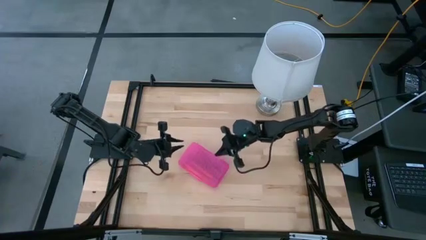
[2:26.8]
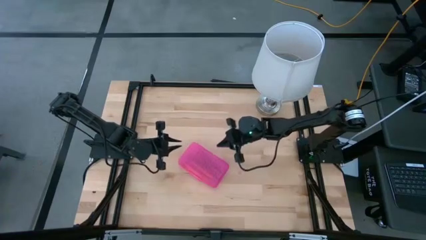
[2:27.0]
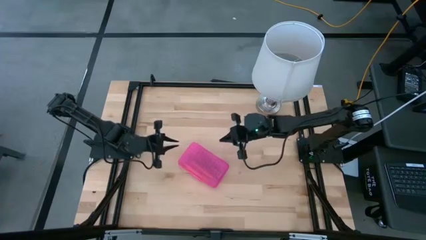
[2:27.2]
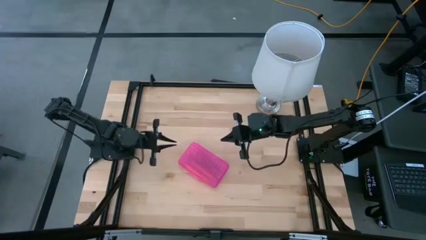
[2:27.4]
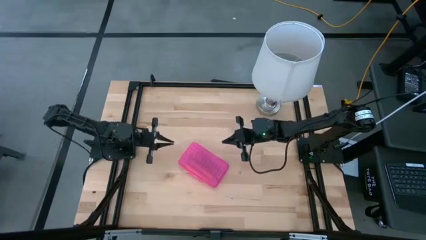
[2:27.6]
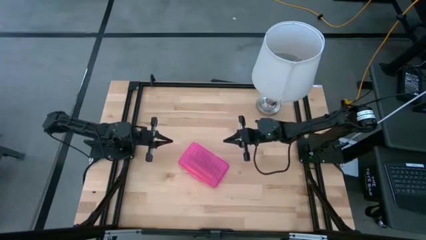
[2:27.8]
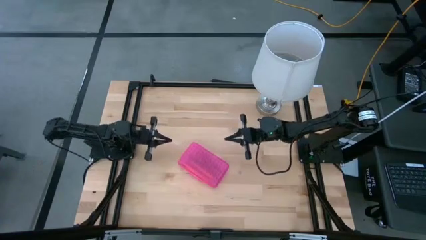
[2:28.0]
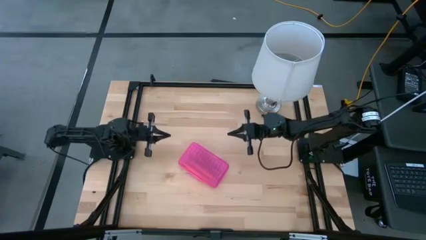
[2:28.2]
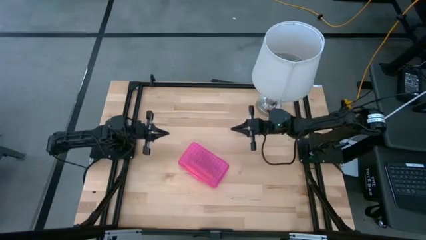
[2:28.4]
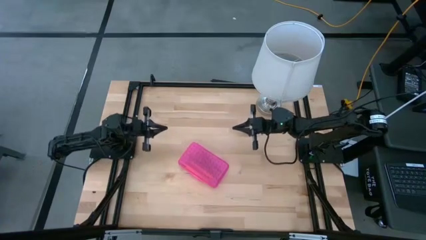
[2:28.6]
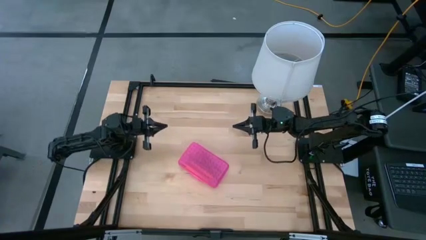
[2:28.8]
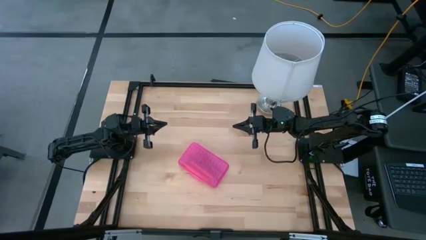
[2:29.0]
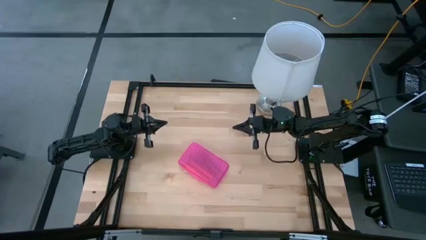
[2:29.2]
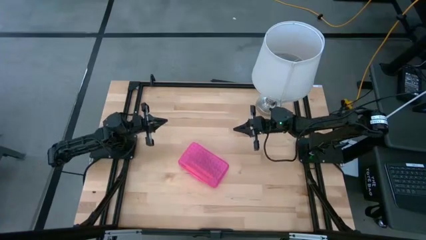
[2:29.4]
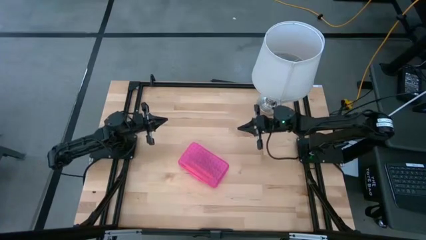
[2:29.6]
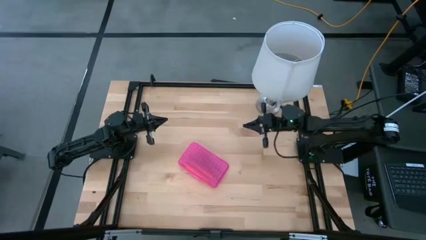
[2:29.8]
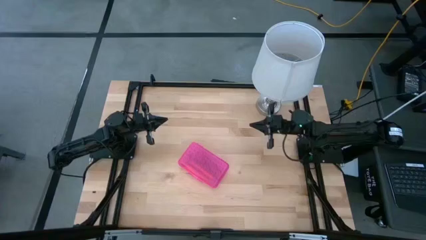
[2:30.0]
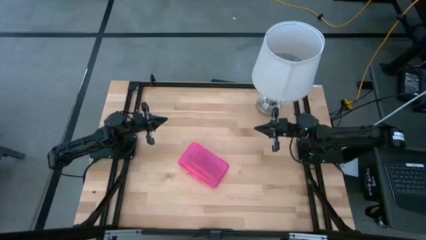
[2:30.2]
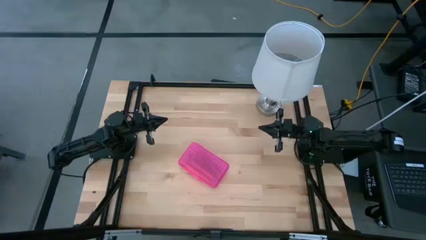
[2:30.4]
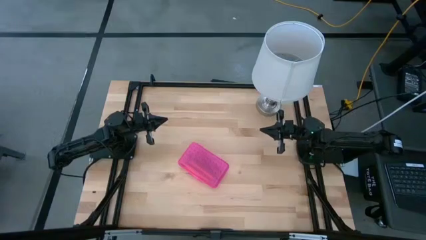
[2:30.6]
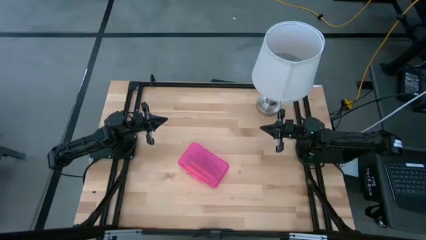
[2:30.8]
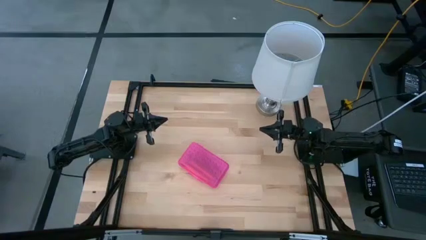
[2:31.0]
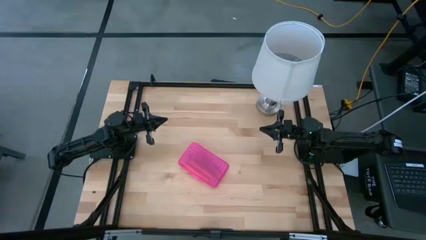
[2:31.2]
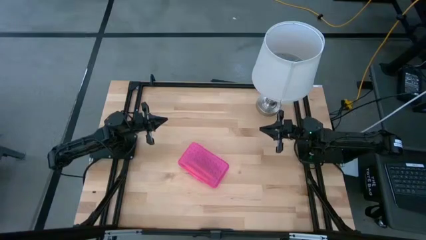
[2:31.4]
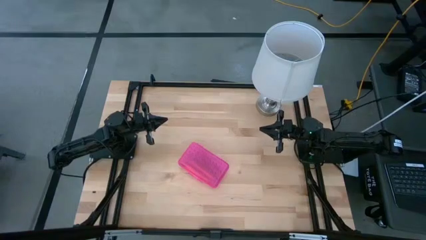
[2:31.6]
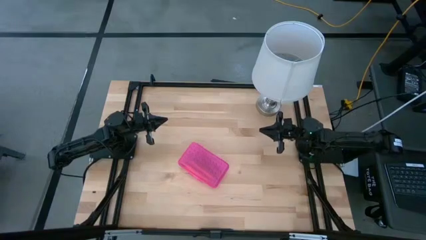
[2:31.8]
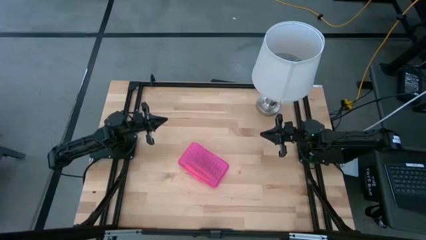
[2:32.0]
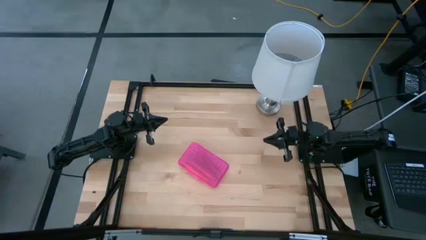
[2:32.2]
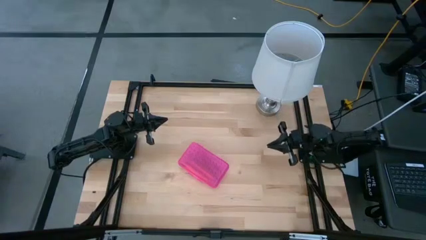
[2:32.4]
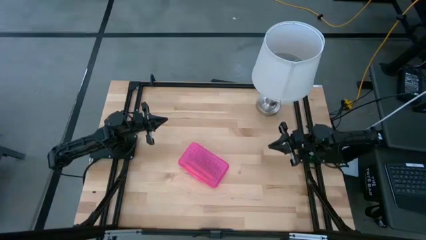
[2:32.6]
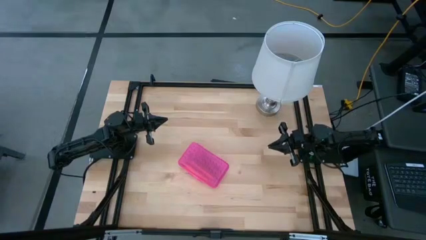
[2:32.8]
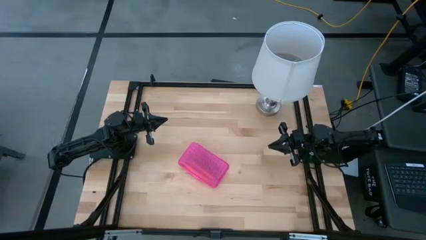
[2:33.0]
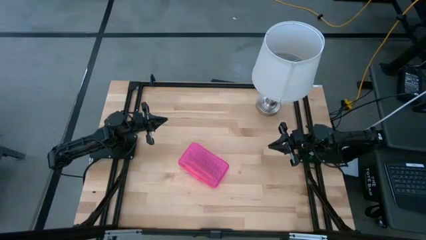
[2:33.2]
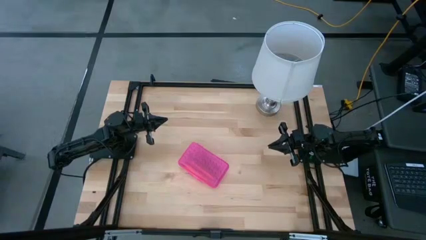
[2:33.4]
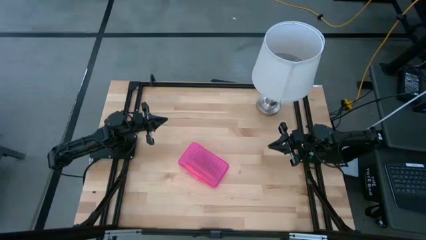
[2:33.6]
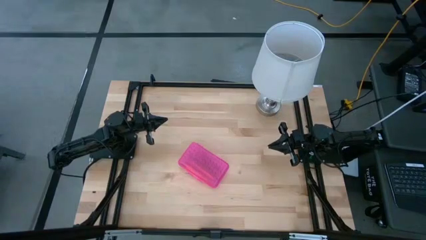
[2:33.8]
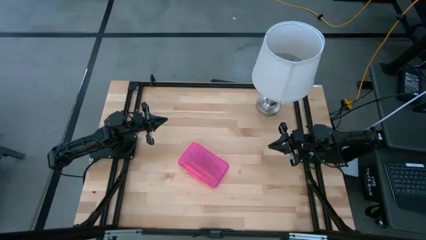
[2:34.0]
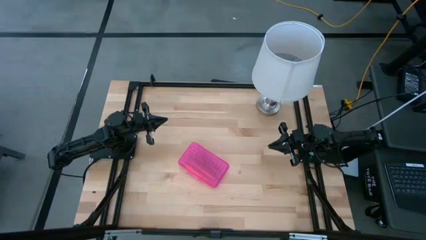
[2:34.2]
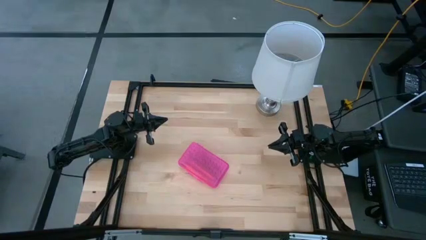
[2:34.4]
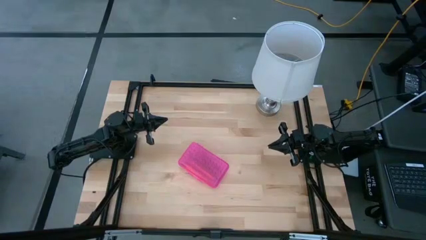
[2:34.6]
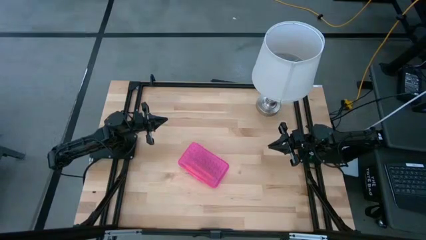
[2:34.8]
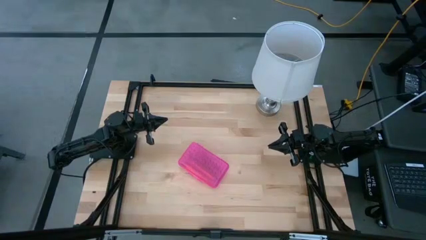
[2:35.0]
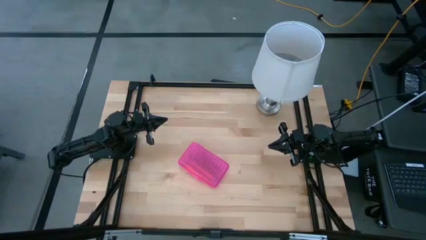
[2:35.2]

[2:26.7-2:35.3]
Task: Pick & place school supplies into a supply box
Return to Home Position

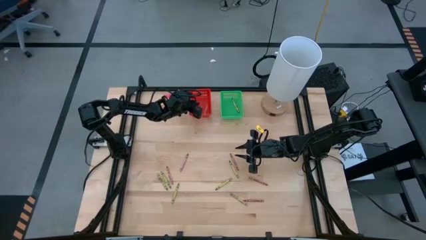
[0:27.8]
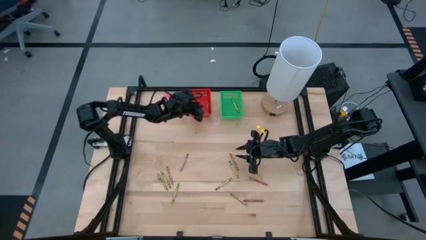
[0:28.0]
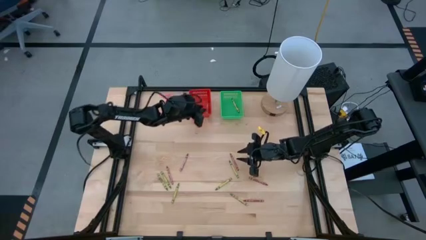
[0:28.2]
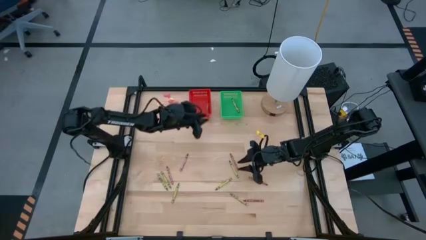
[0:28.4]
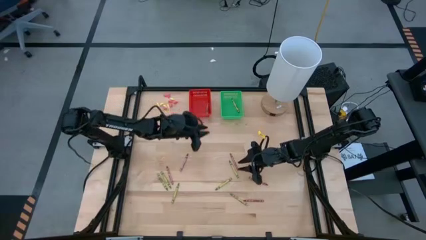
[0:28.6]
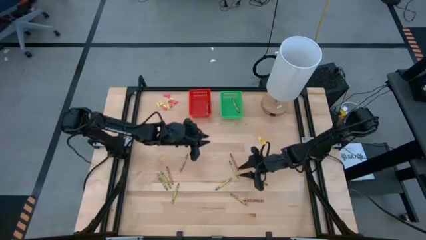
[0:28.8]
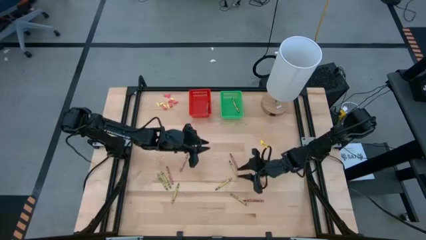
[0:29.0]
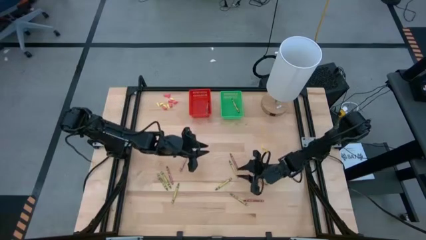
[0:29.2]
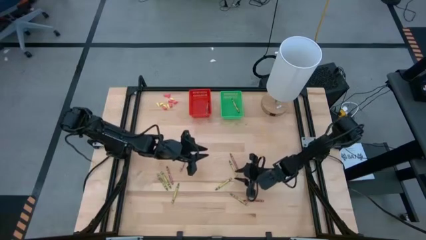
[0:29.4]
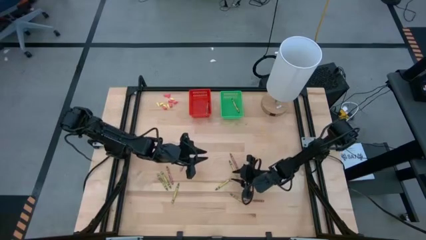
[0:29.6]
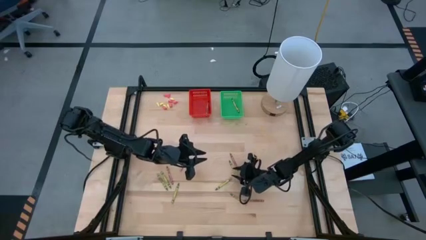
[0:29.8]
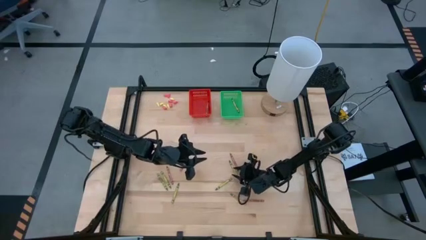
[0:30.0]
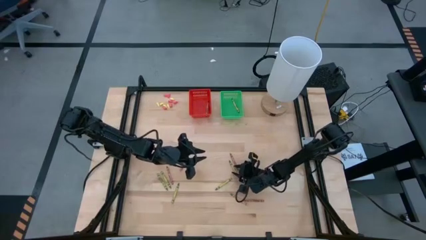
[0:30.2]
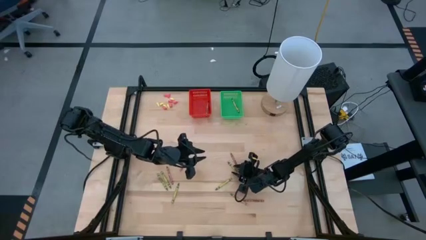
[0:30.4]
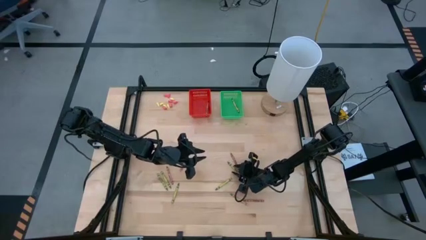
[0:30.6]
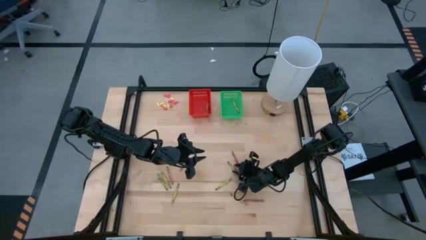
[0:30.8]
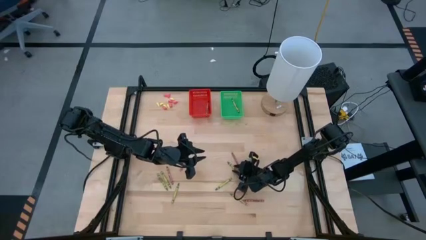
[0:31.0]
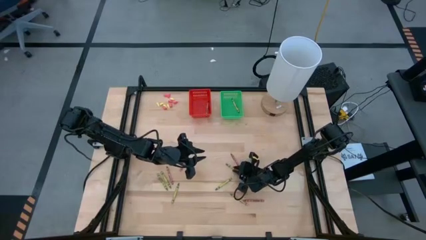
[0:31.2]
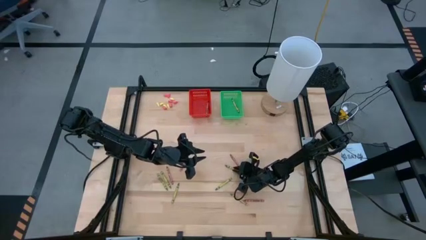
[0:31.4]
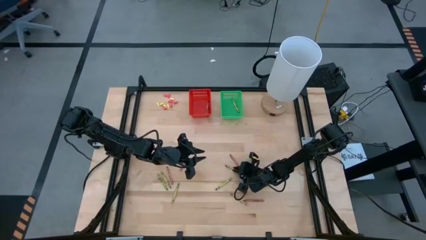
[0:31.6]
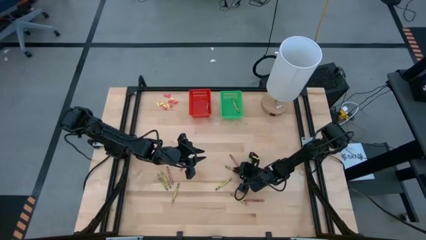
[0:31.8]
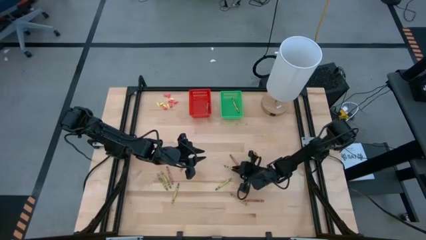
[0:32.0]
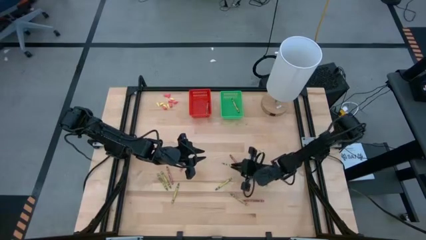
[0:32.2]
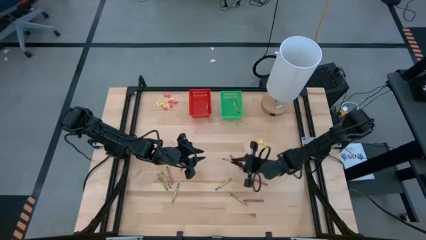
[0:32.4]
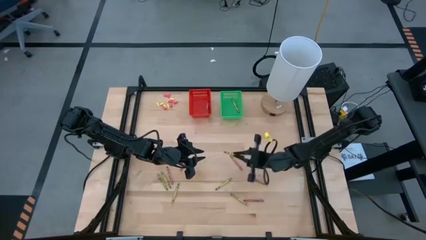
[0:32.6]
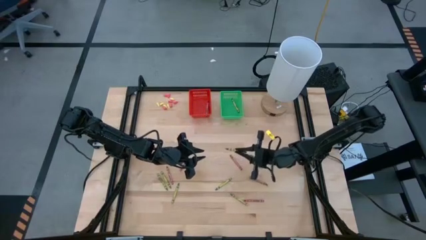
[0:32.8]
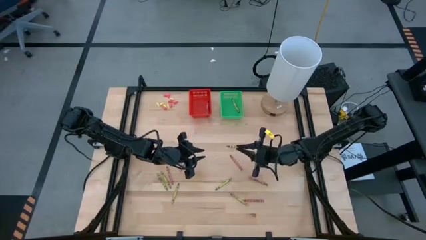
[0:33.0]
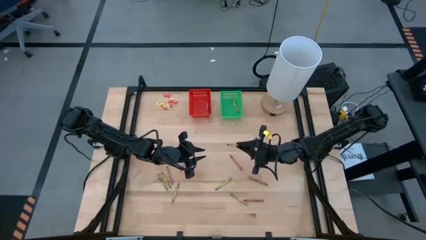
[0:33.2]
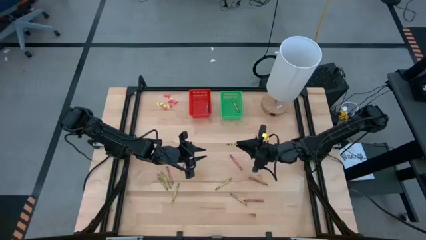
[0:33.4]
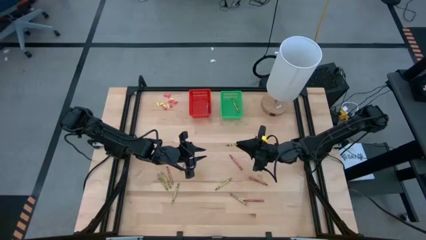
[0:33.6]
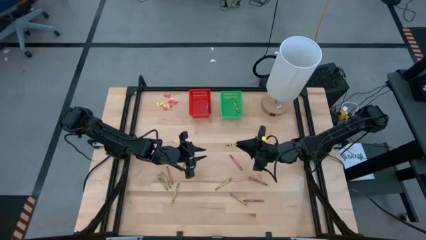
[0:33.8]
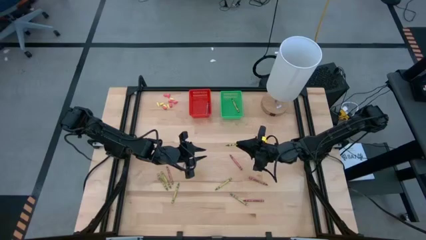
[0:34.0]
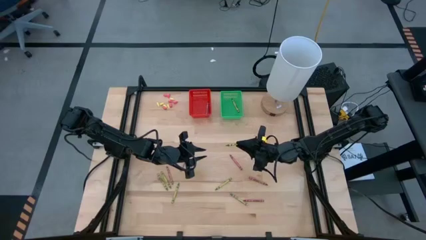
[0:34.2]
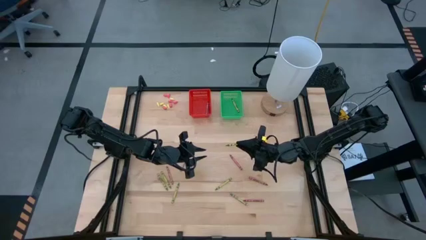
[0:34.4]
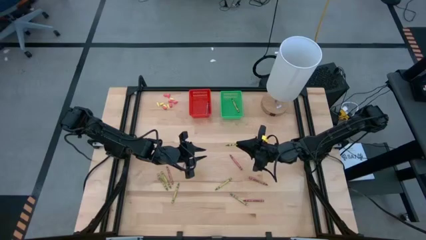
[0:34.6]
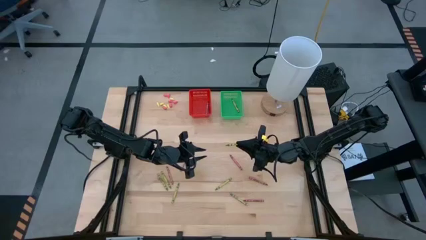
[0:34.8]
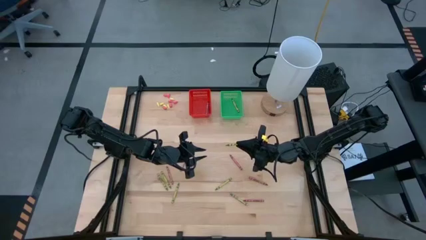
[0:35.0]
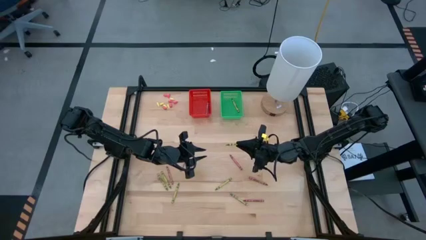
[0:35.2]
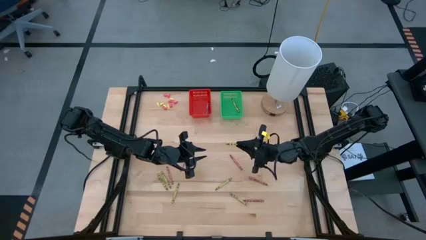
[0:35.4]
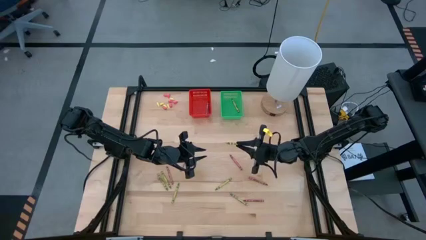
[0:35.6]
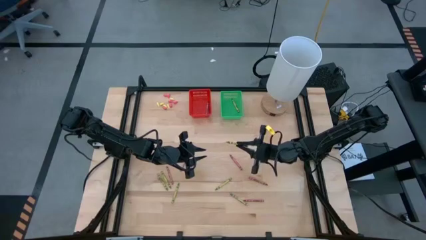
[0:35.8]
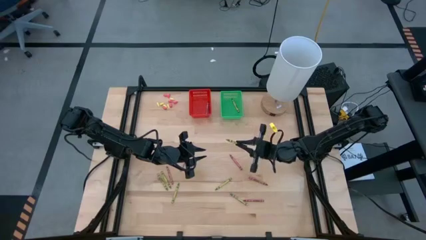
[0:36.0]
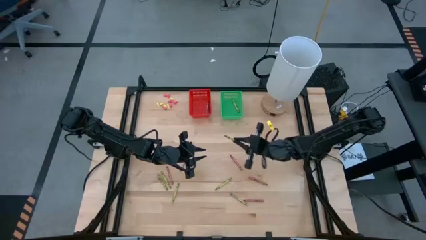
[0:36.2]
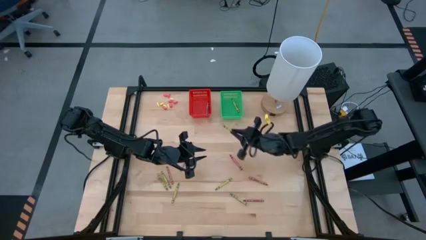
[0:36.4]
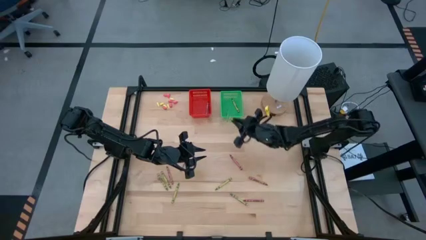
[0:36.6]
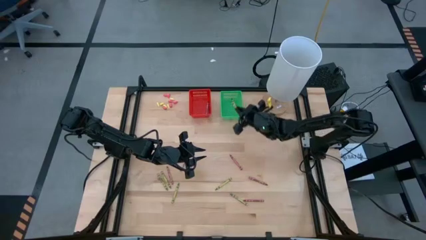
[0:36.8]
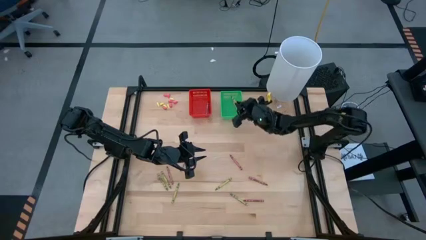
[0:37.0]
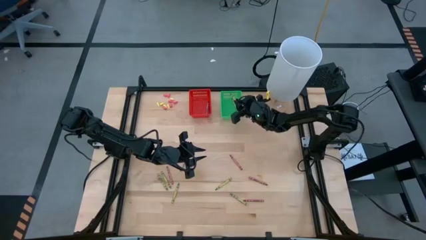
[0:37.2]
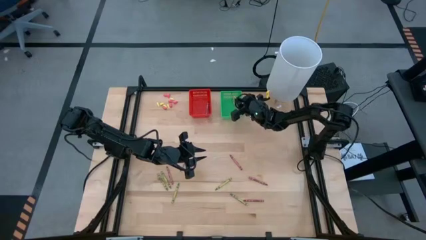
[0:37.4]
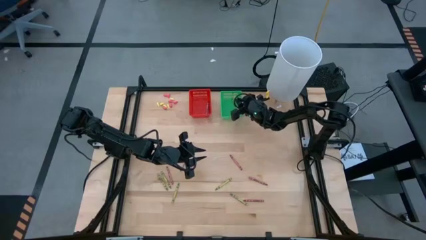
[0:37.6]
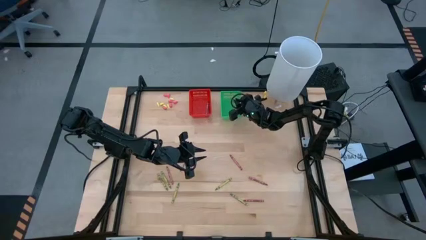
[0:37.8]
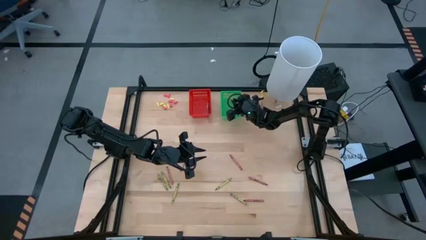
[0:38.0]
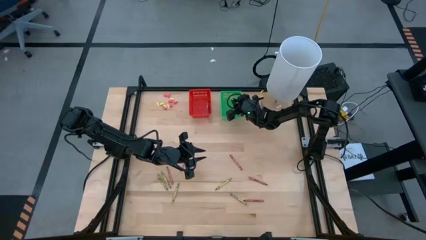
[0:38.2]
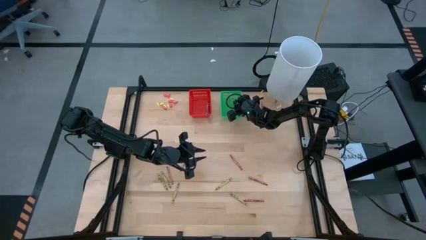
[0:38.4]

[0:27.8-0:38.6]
Task: Sort crayons
Put the green crayon into the green bin
